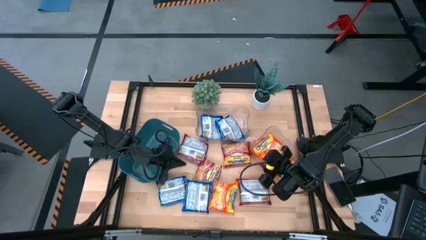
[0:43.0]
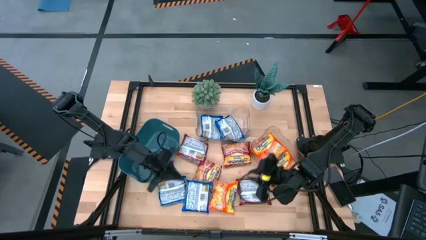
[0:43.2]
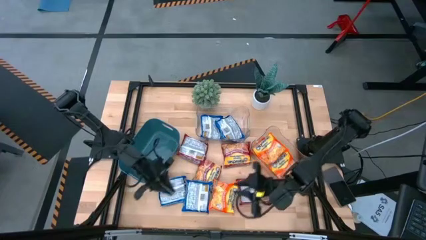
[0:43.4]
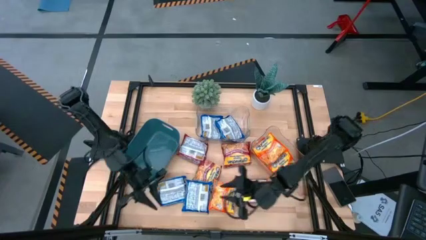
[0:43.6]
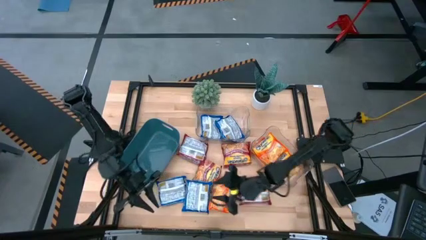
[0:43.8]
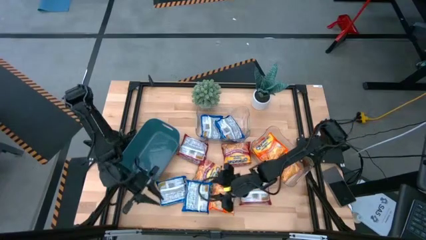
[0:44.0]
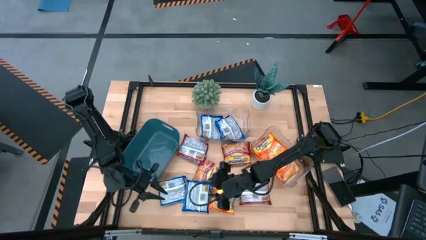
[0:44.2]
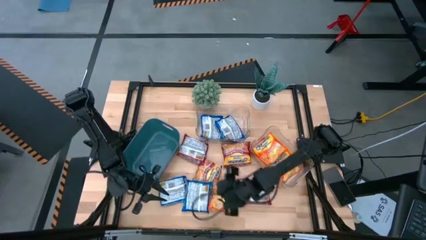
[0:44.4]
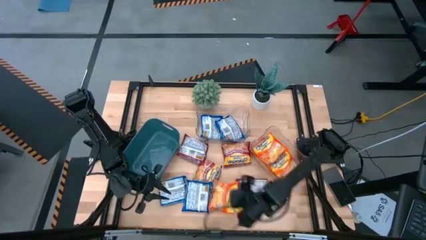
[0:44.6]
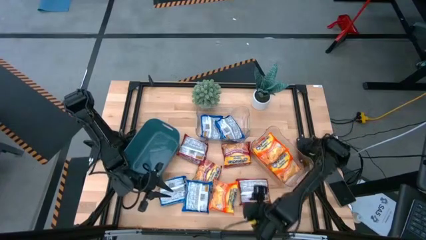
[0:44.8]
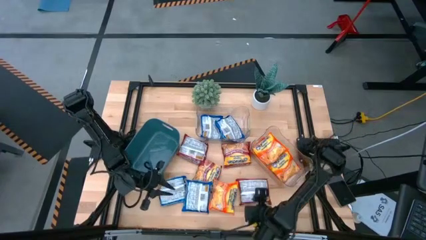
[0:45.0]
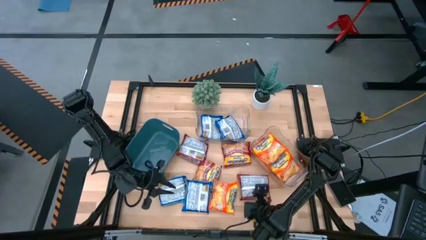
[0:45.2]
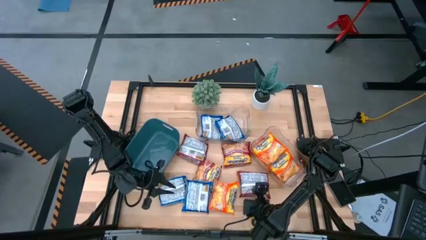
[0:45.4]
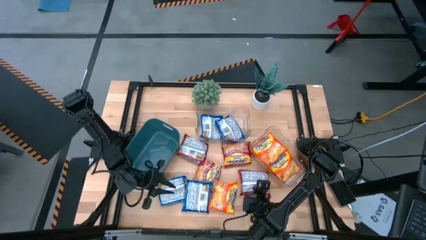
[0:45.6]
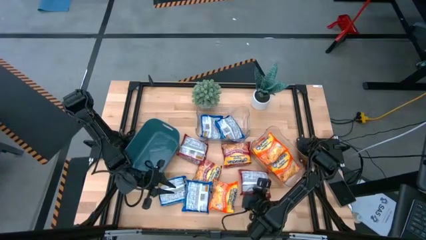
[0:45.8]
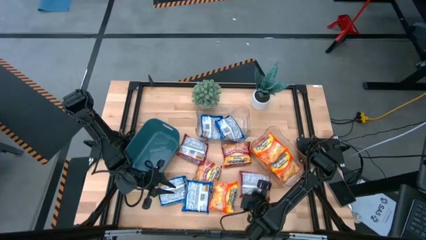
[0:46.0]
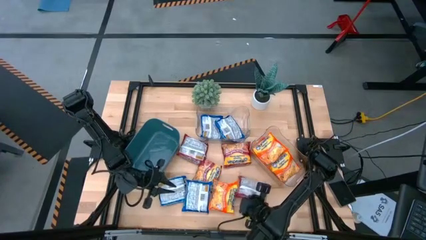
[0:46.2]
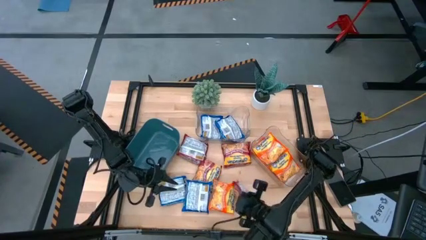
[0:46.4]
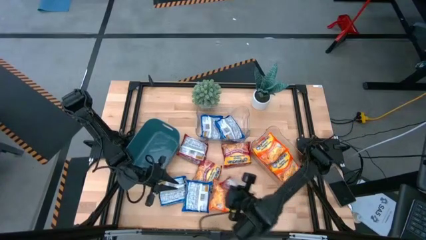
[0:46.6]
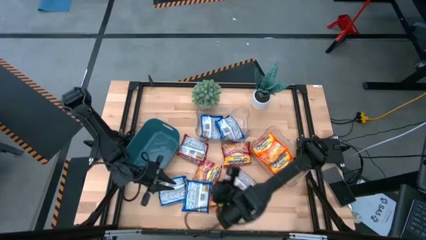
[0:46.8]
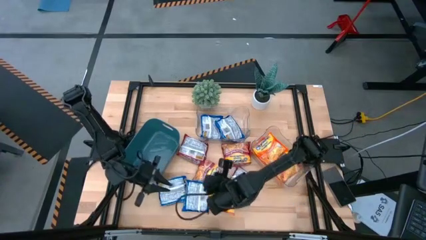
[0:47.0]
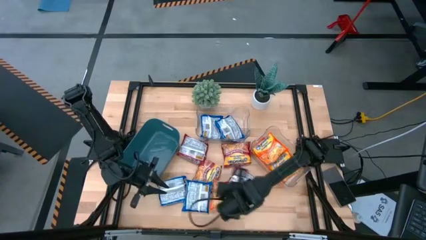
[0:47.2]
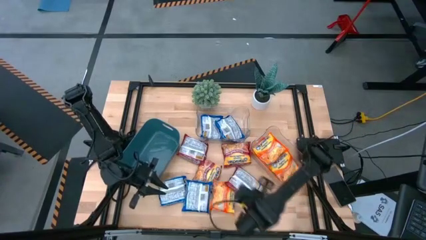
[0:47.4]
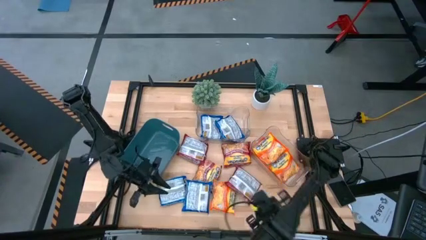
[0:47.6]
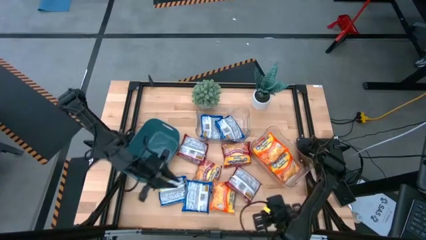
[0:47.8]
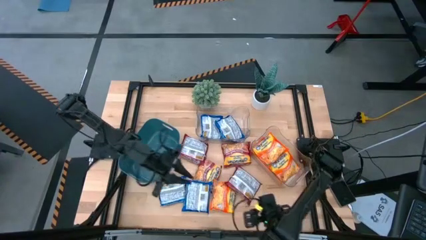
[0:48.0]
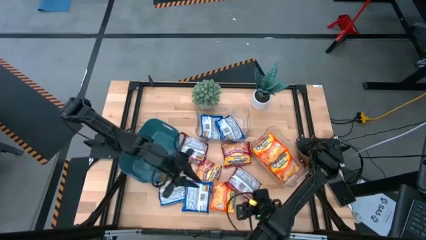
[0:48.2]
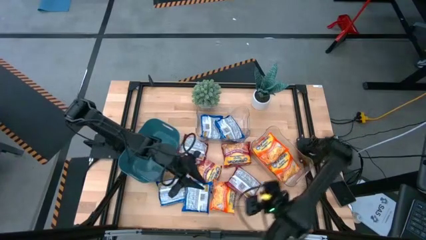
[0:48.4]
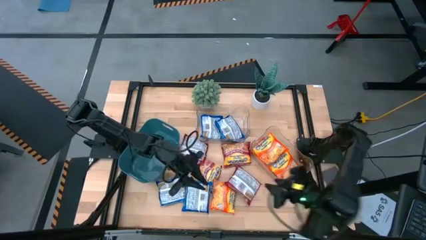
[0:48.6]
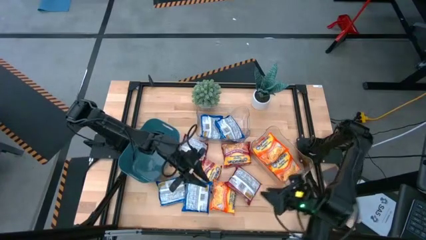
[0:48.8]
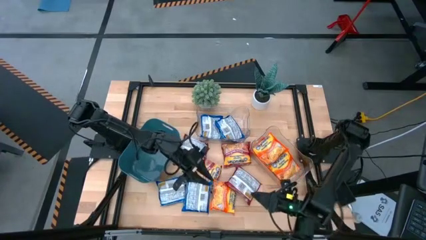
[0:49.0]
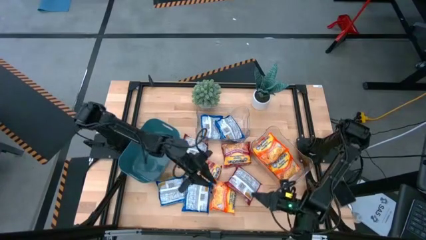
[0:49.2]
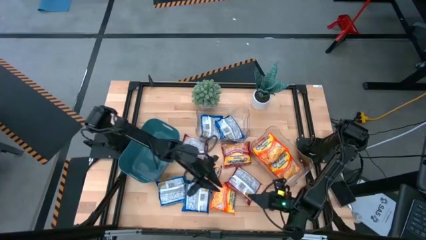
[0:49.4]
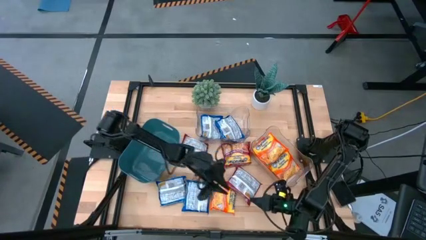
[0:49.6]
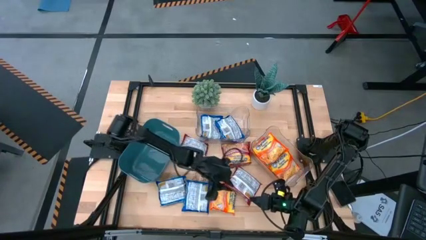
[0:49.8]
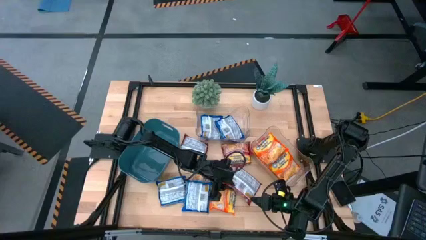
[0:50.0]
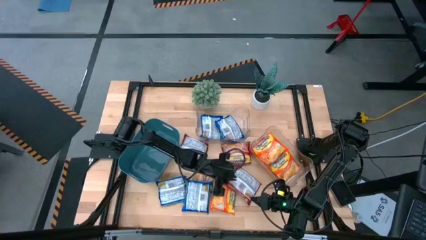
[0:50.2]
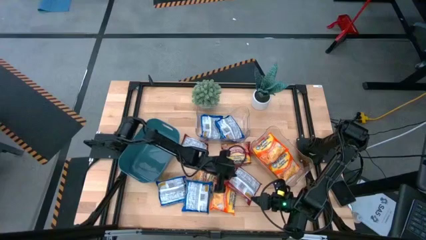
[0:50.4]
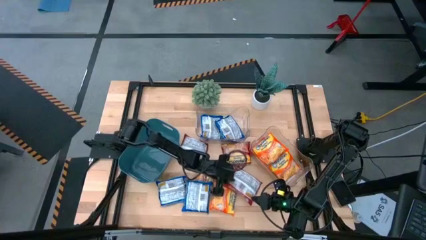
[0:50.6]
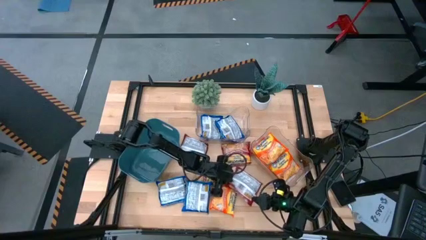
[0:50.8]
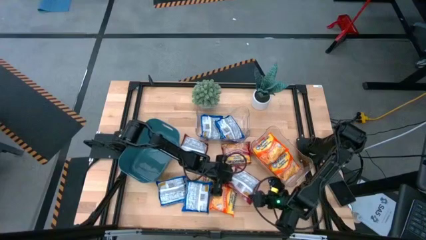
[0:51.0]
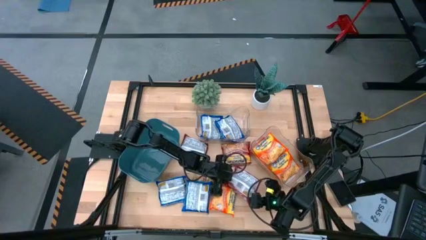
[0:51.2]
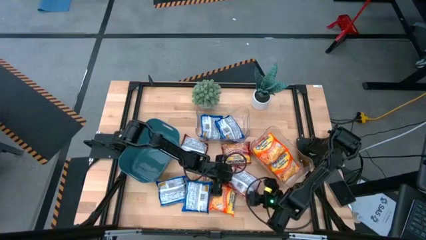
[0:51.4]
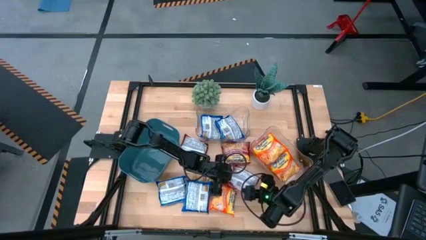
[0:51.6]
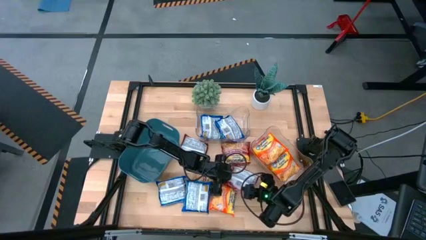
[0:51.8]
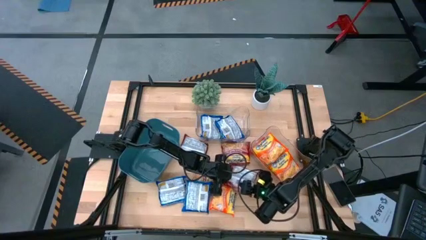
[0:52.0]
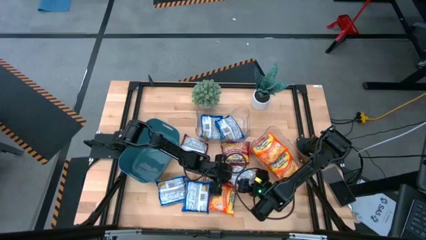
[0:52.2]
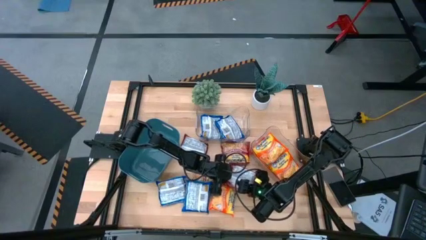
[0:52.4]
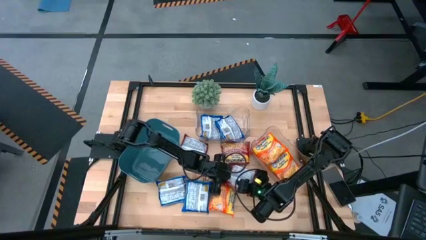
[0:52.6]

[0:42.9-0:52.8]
Task: Sort Maruchan noodles
Put the red noodle pack into the blue bin

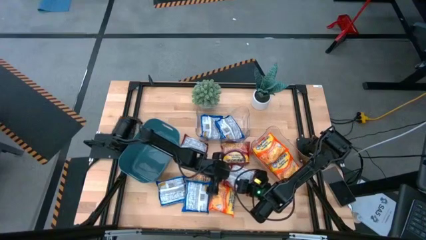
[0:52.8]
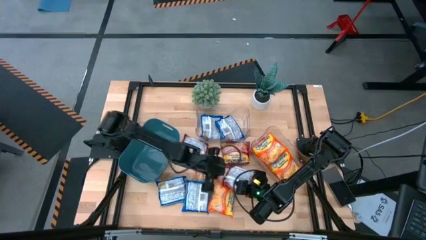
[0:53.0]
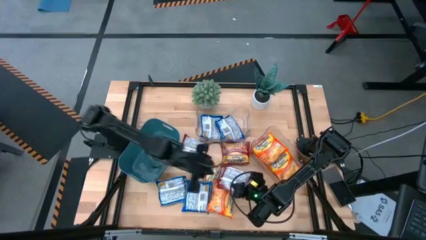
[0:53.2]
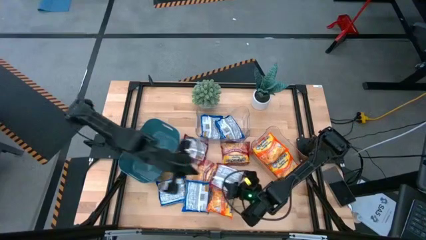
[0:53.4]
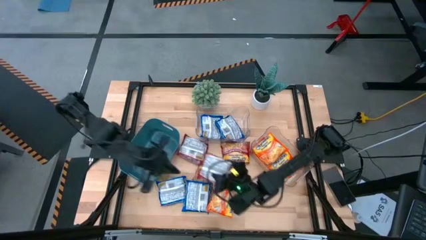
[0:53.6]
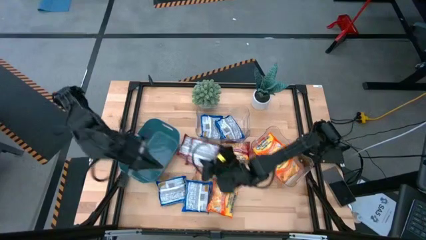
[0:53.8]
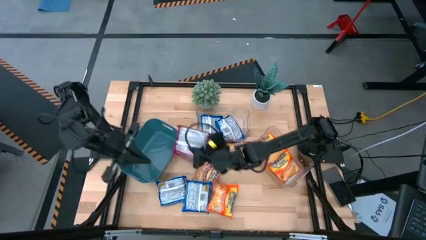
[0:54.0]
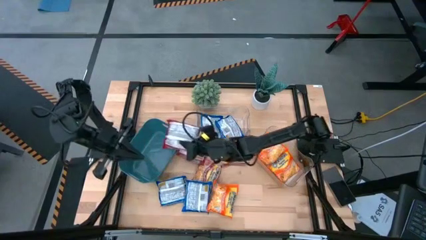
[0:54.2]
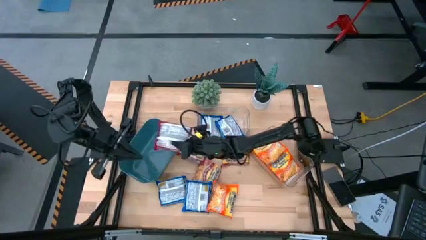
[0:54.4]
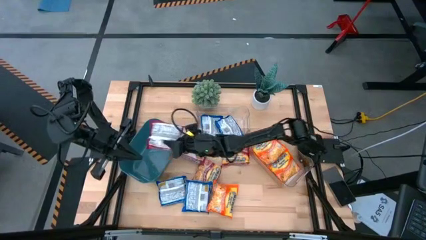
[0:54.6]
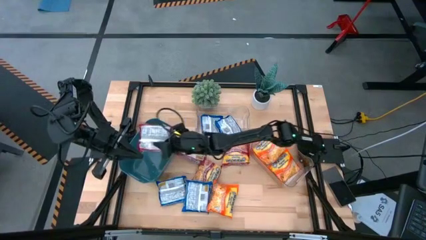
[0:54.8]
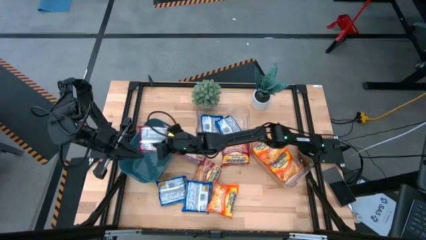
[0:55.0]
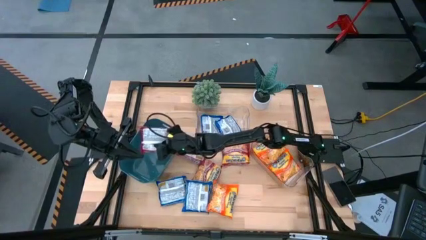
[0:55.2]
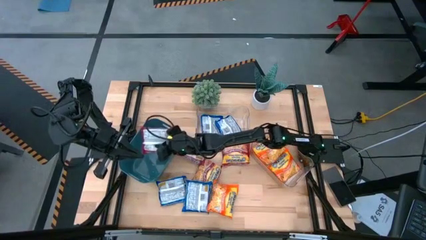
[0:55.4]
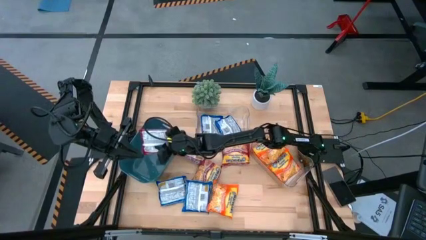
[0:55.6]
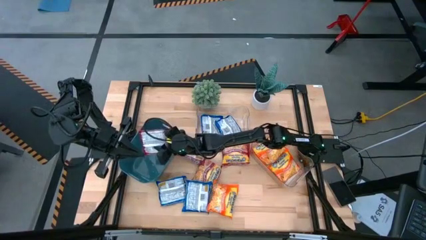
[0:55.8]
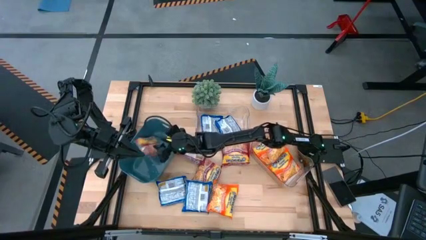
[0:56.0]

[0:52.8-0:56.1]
Put the red noodle pack into the blue bin

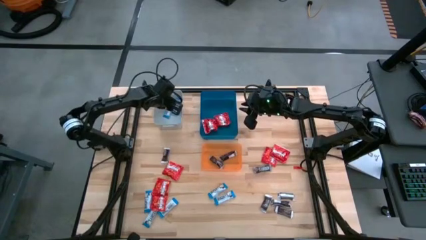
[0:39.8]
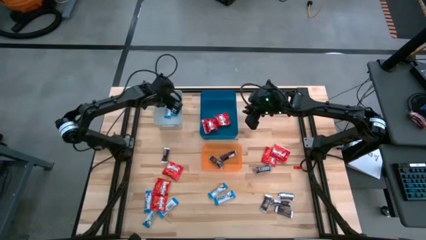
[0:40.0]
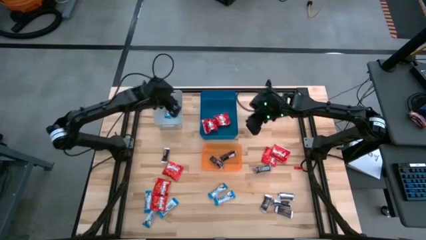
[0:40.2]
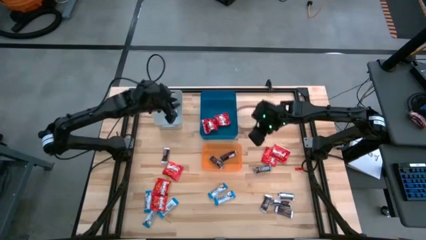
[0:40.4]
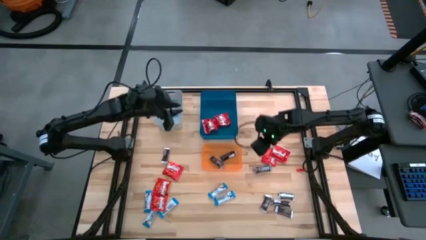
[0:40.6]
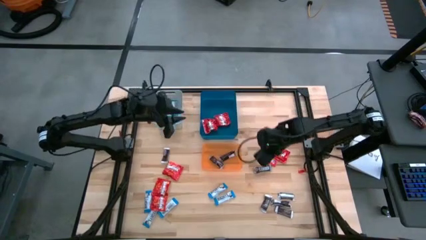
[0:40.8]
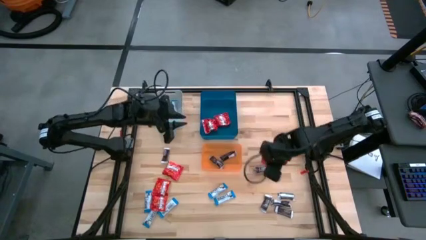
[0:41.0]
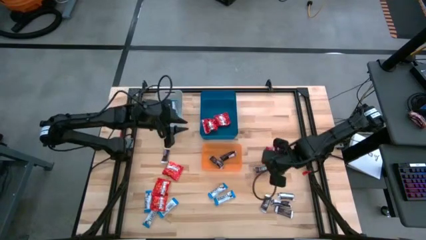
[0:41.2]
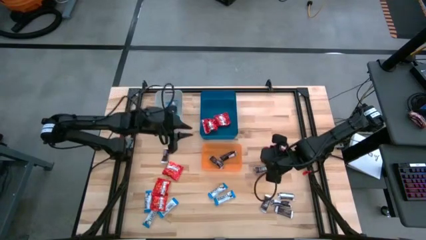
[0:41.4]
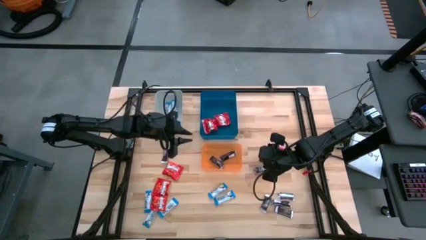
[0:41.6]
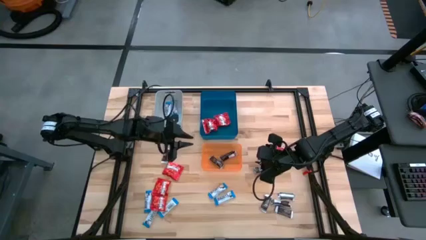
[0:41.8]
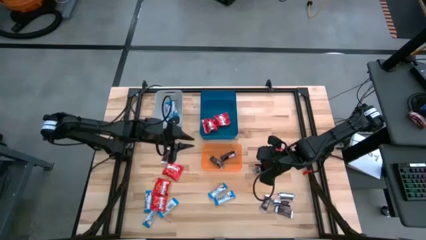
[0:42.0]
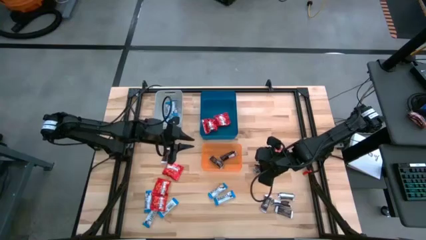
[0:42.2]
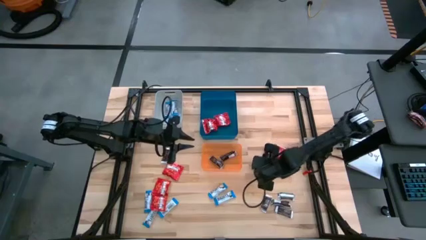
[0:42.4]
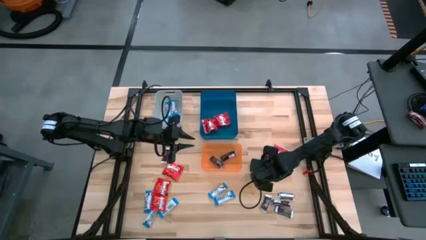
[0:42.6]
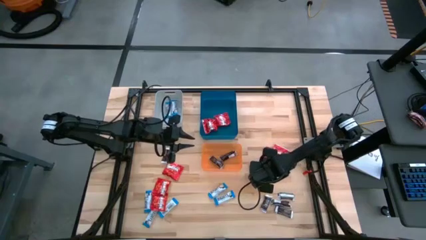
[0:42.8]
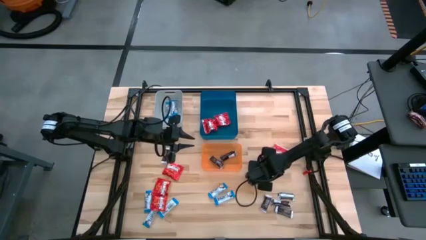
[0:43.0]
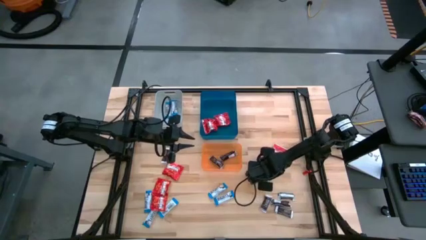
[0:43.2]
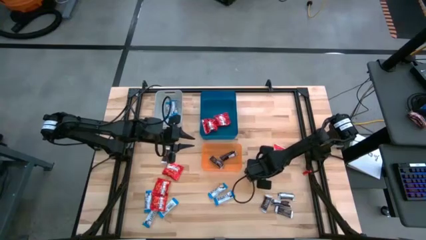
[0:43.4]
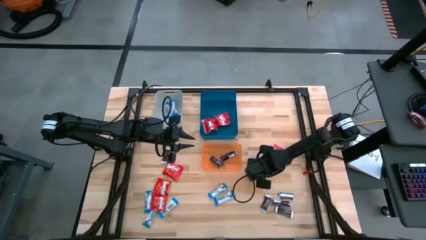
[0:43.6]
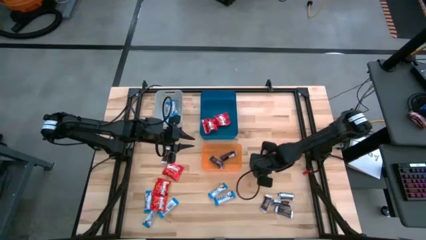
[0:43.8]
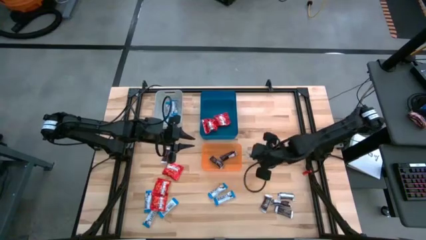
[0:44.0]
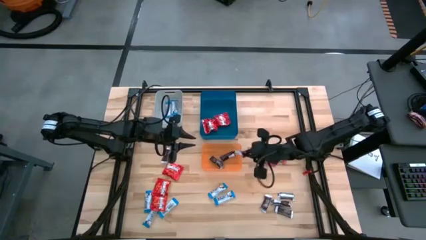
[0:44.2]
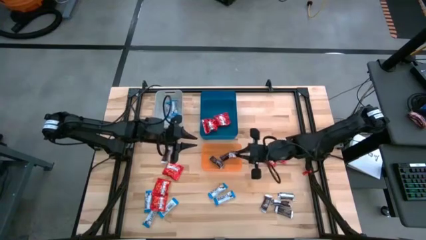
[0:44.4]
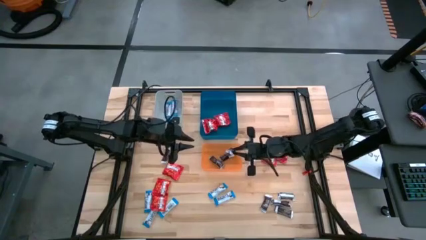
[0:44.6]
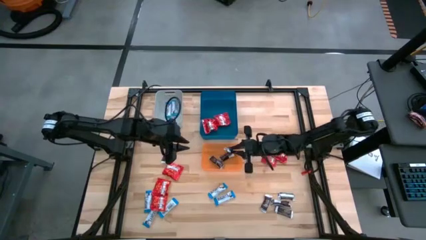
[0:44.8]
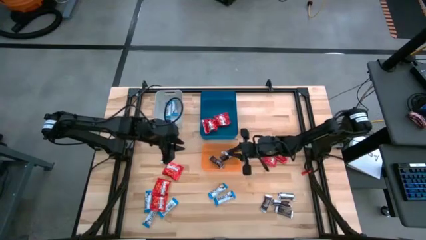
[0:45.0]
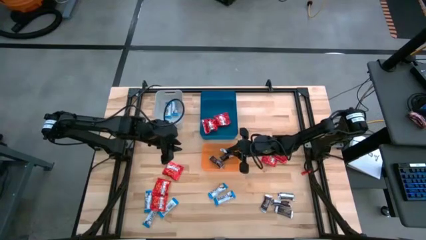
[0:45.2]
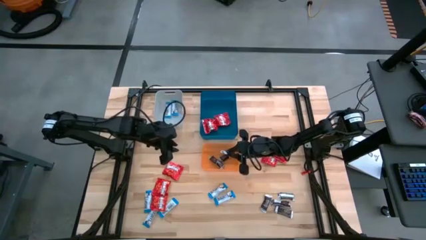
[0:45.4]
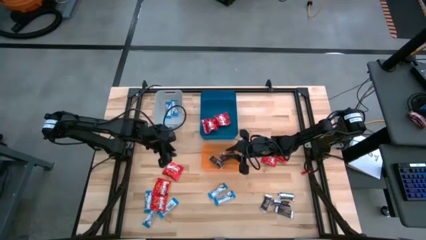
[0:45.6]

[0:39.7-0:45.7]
Task: Sort candy
Put the brown chocolate bar into the orange bin
